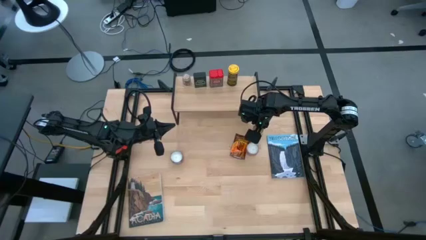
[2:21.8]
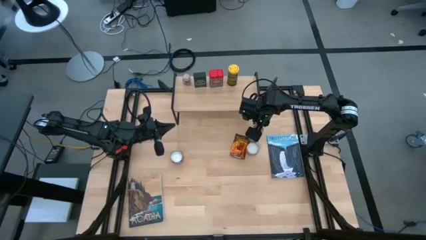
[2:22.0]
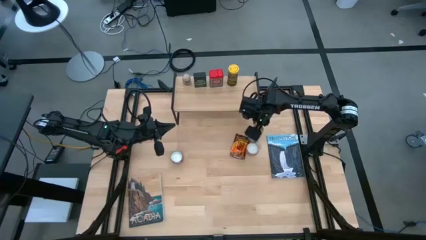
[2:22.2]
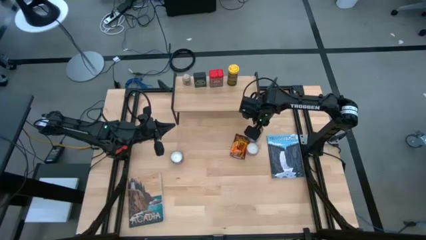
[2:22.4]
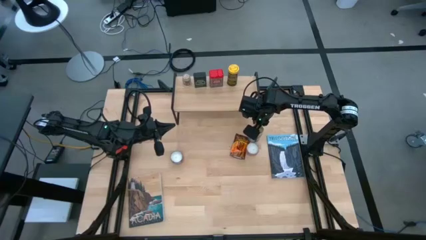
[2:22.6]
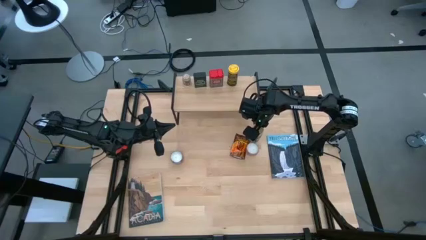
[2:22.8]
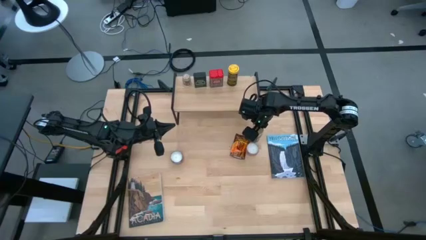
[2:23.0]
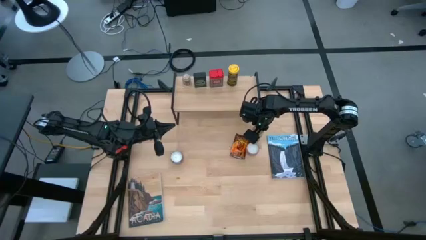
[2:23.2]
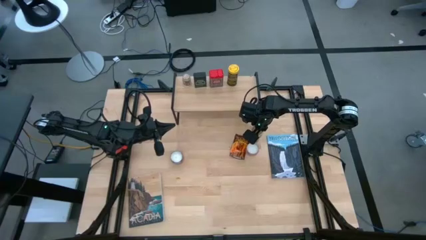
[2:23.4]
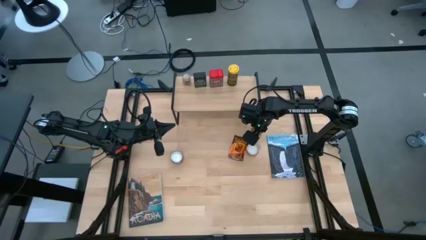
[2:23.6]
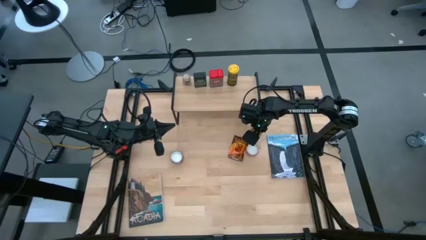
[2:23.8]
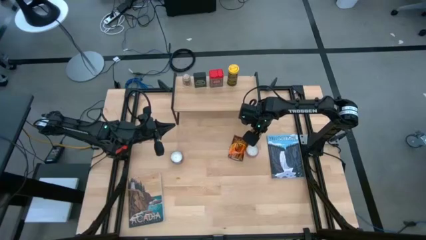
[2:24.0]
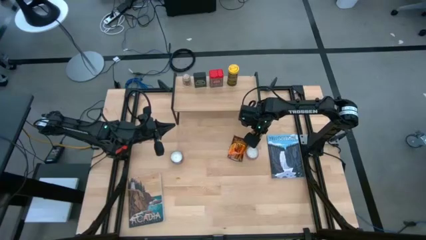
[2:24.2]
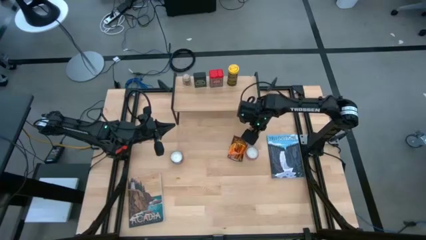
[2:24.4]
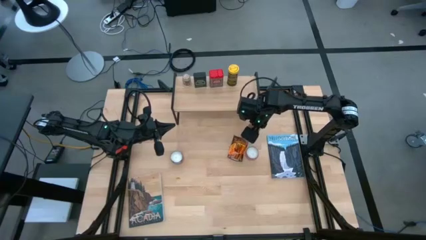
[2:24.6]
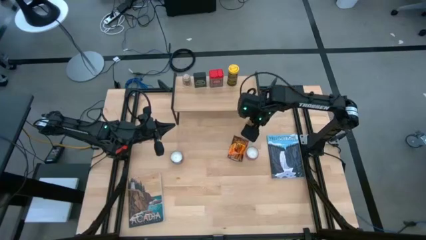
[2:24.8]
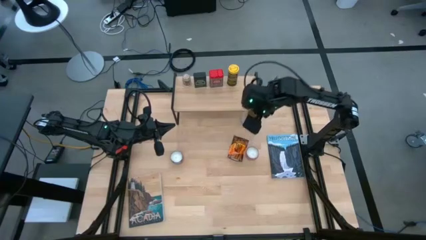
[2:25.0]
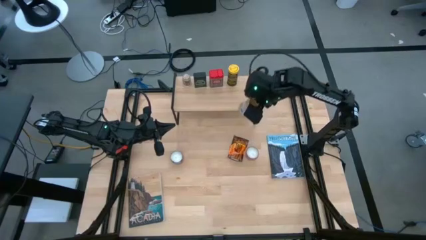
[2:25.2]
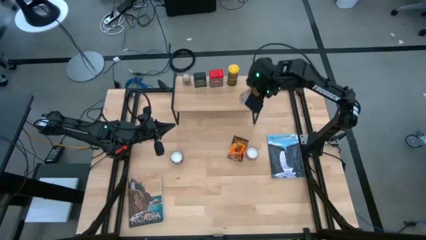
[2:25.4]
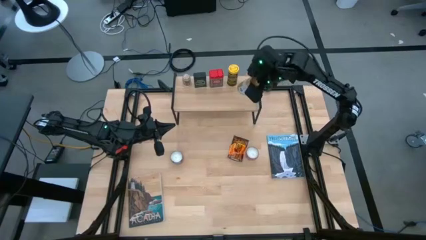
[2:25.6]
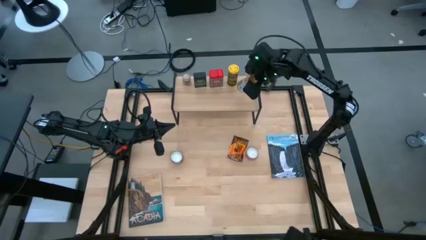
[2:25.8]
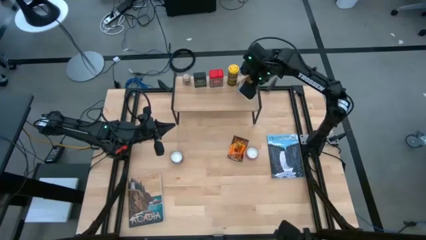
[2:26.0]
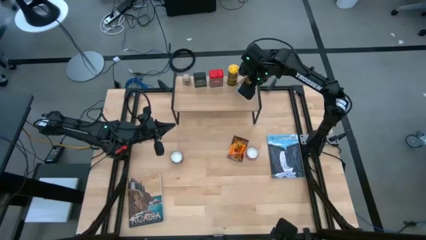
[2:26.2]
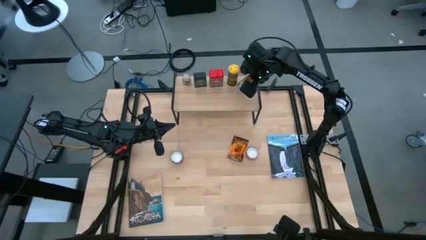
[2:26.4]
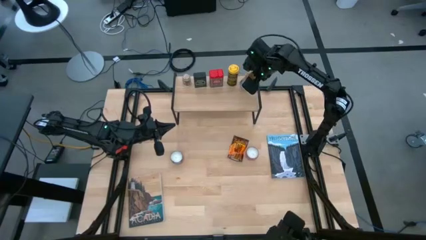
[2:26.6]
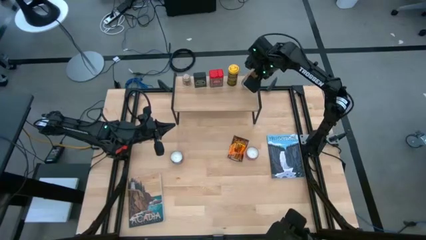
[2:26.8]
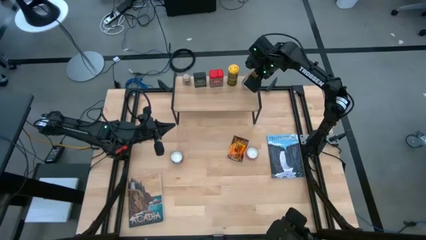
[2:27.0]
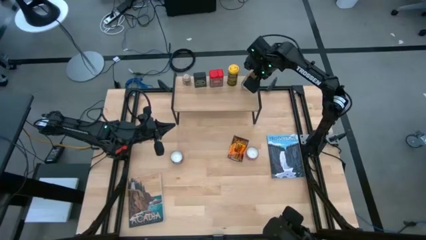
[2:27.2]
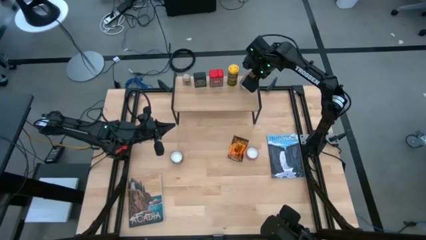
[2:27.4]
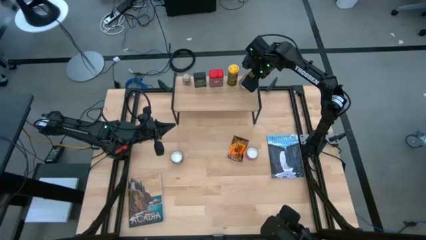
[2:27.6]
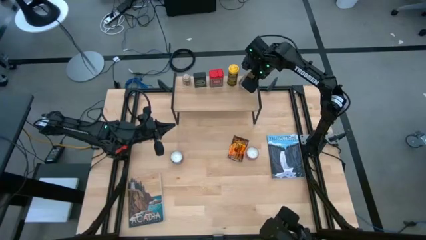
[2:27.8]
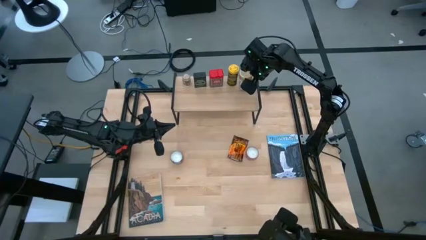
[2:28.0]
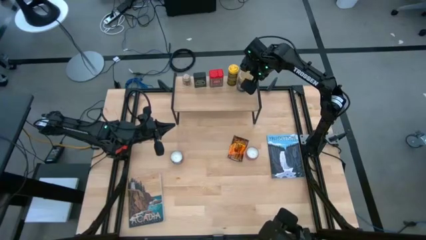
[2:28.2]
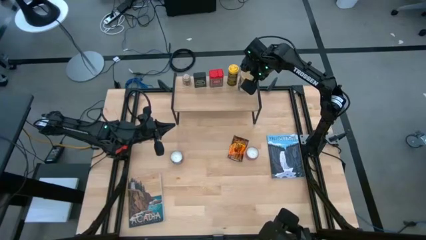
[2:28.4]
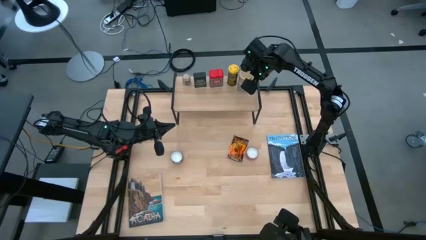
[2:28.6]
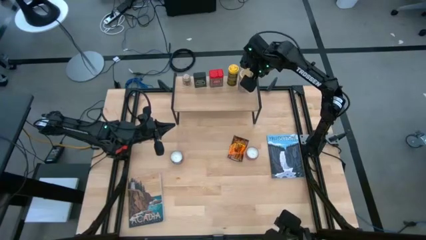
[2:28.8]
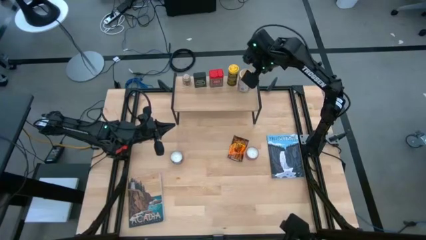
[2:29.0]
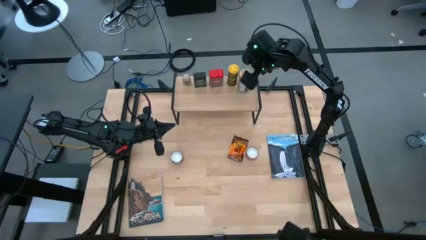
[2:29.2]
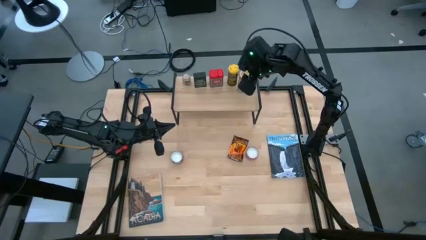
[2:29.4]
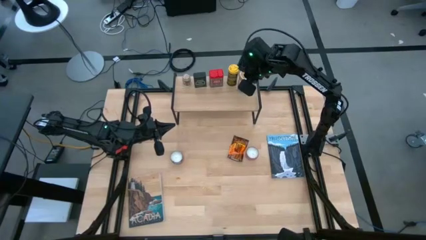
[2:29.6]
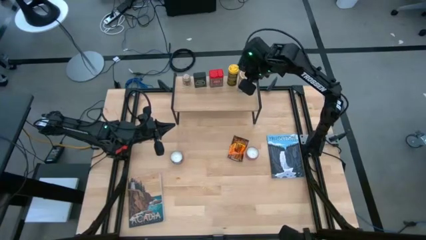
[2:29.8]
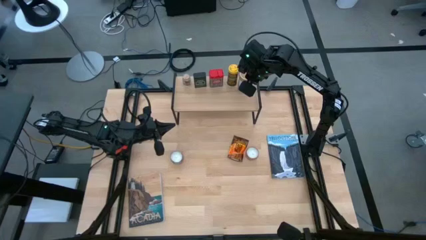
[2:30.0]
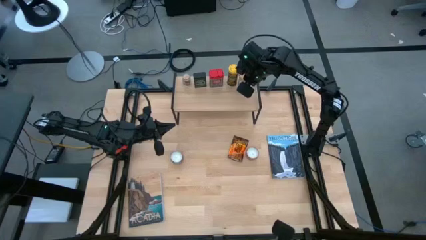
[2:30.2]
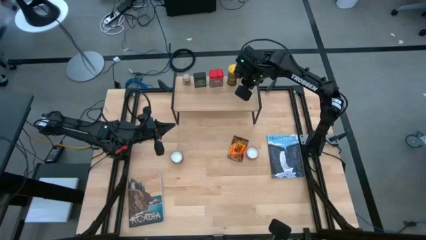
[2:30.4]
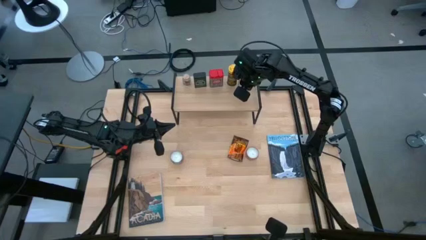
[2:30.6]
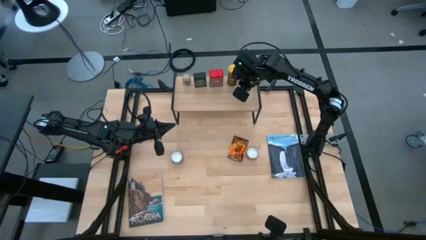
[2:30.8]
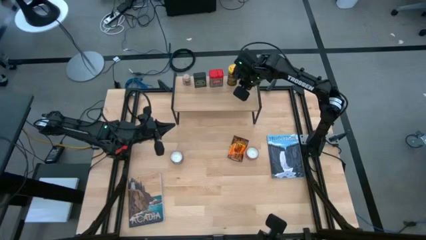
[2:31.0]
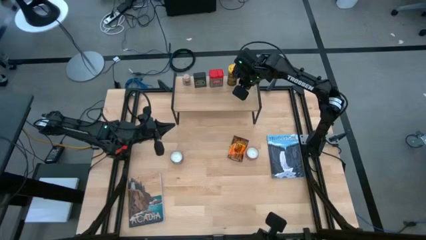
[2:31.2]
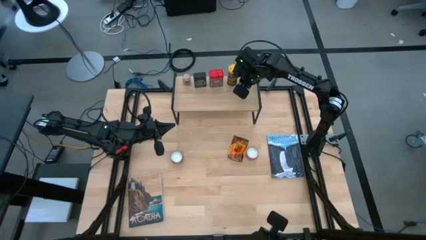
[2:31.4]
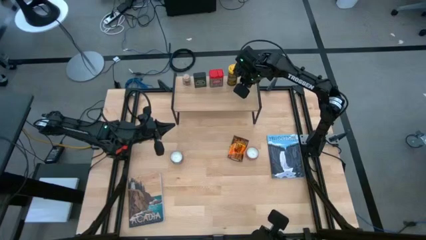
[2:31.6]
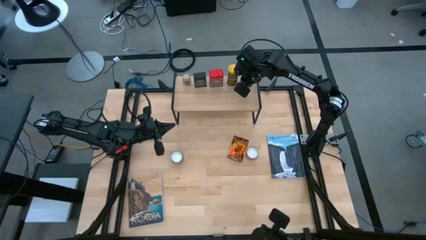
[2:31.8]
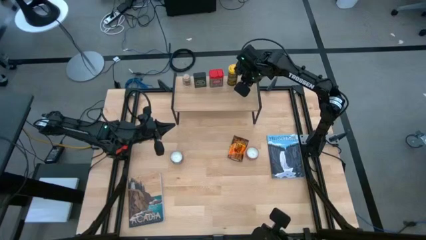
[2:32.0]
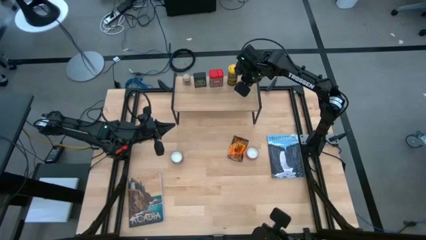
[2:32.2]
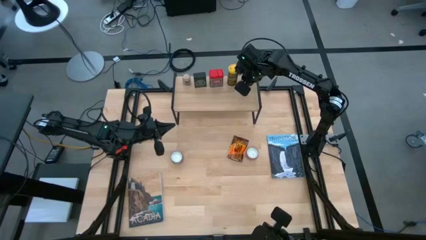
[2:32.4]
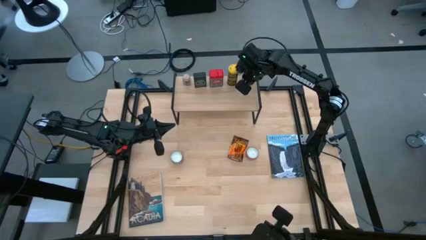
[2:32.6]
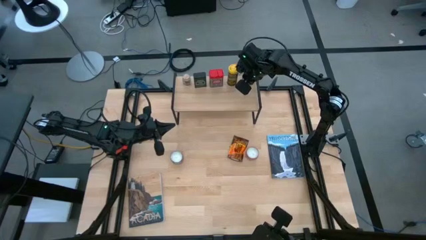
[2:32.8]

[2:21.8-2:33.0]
Task: Shelf spices
Put the gold seasoning bottle on the shelf

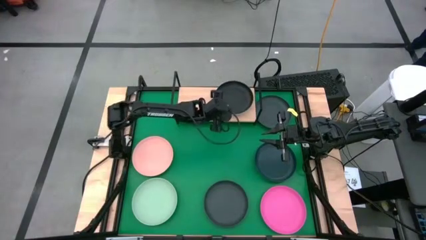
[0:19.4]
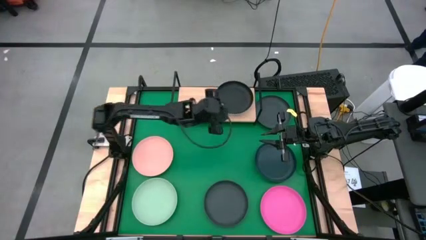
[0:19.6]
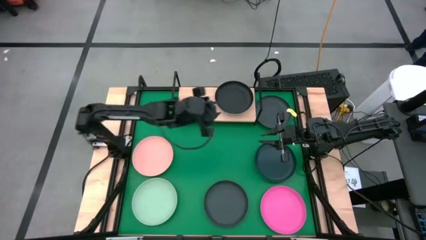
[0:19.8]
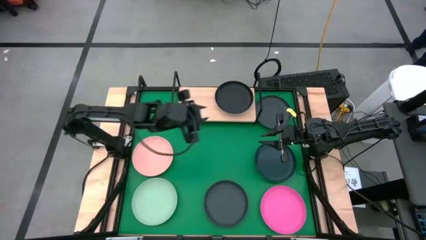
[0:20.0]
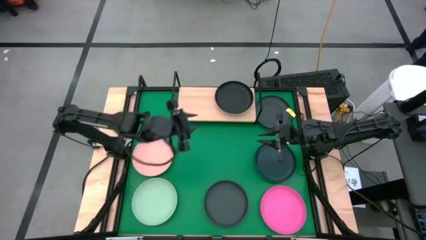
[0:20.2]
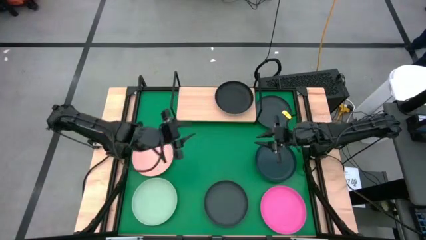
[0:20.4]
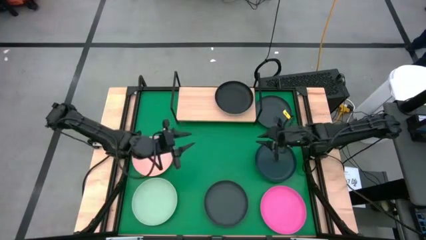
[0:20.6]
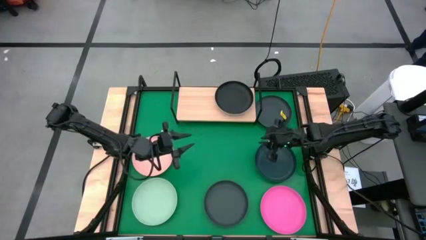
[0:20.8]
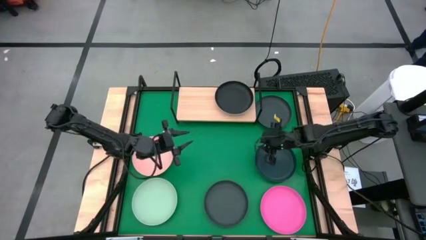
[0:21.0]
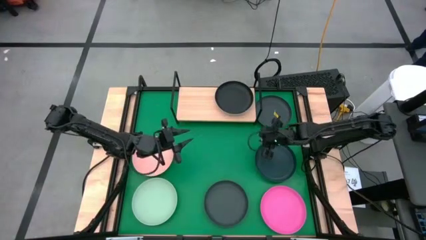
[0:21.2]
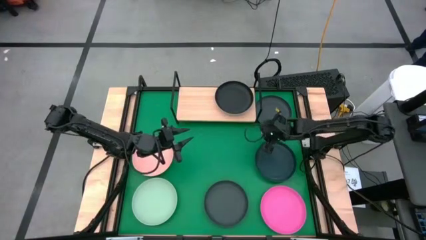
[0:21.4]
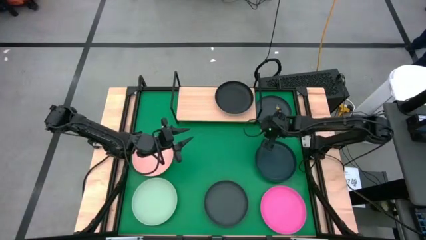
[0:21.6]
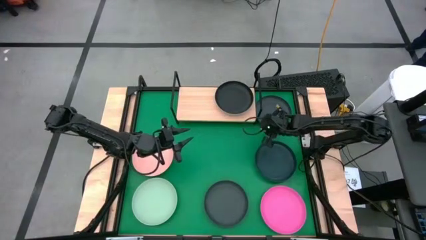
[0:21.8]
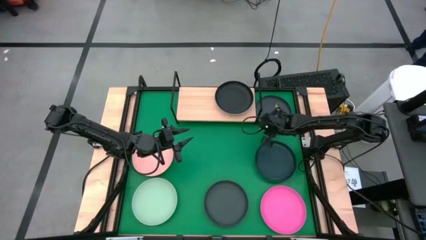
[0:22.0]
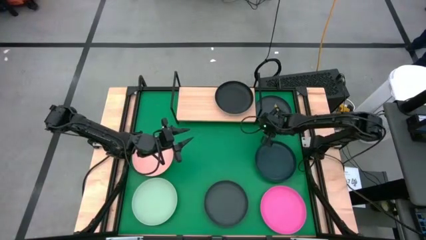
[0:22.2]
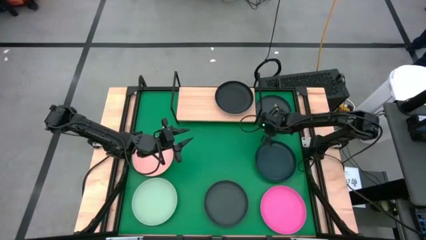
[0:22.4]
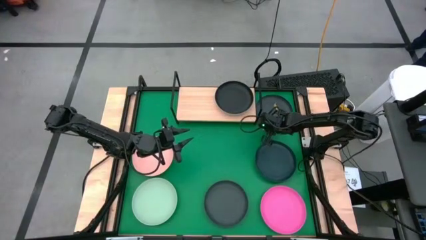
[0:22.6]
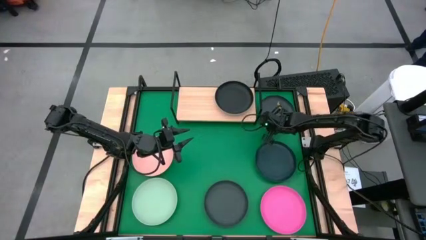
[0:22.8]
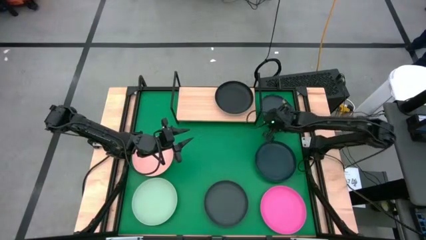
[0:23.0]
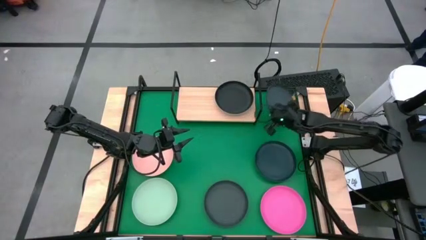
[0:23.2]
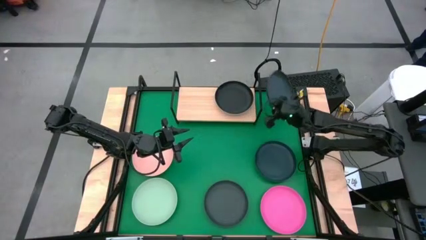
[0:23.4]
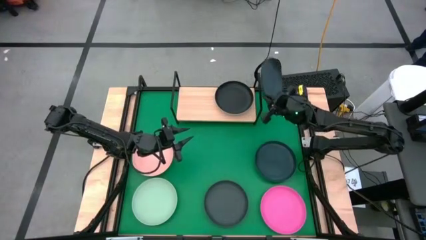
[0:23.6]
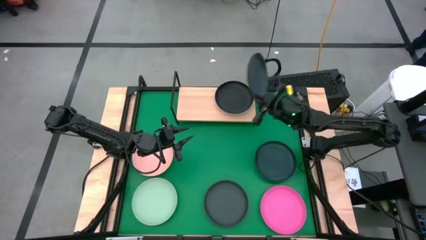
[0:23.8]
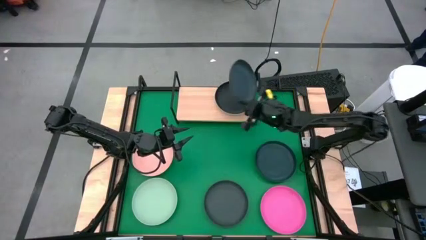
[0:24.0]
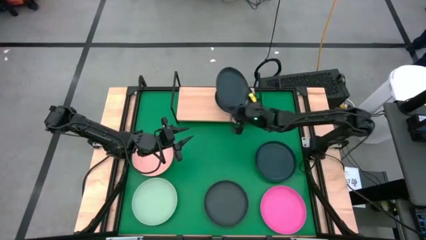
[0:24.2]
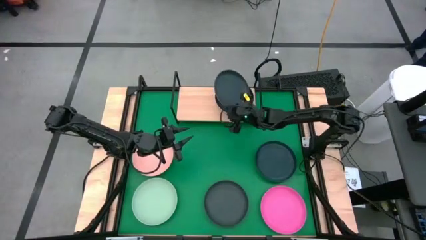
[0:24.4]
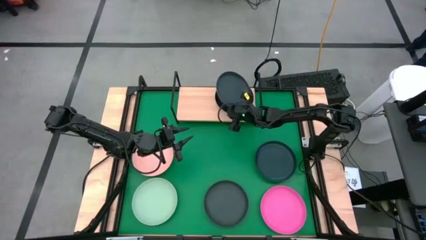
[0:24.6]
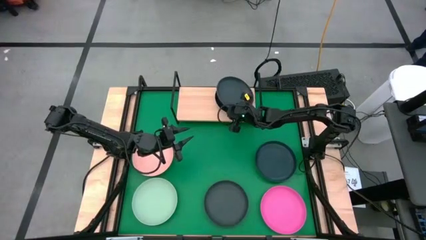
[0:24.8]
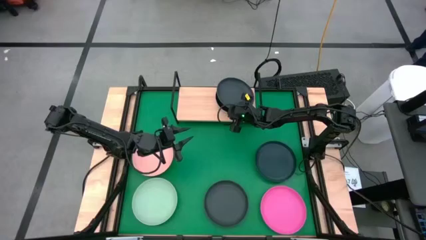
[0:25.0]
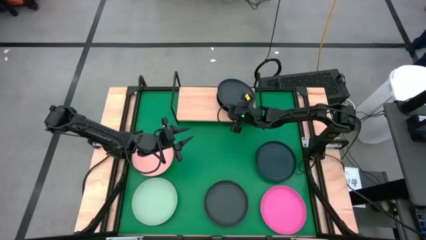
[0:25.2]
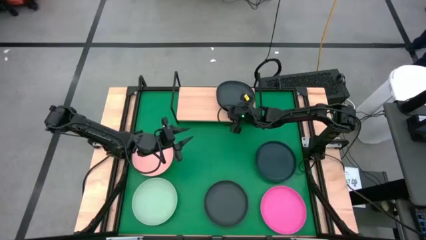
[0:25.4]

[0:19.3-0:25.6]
Task: Place and stack plates onto a shelf
Stack the top black plate on top of the black plate on the shelf
